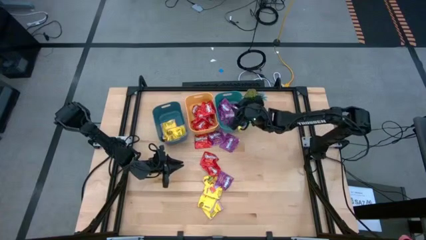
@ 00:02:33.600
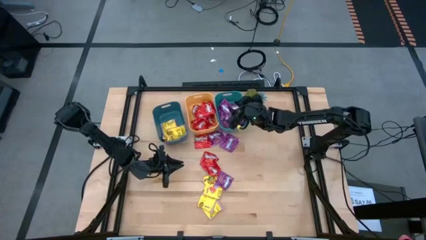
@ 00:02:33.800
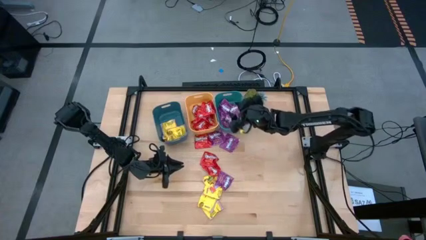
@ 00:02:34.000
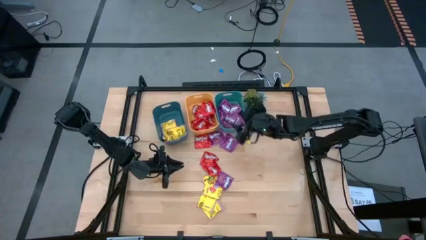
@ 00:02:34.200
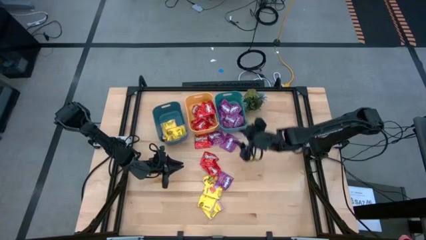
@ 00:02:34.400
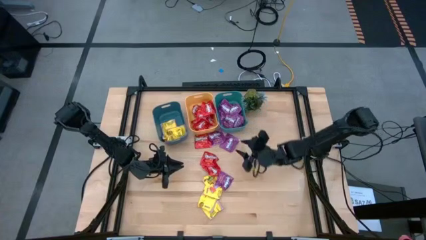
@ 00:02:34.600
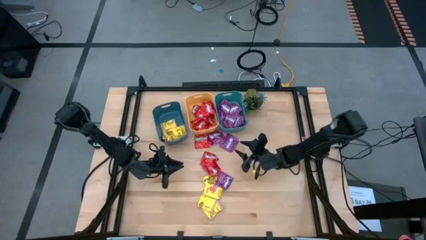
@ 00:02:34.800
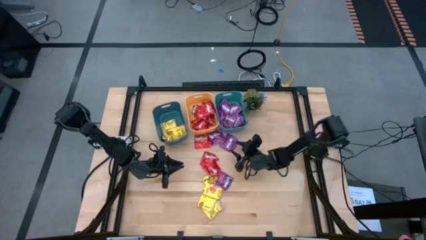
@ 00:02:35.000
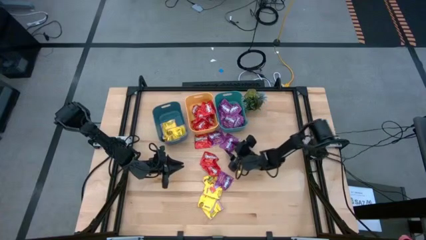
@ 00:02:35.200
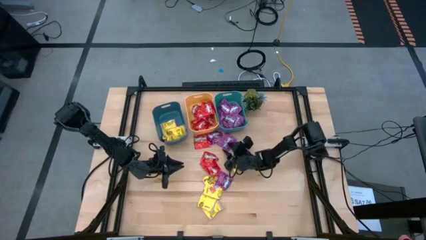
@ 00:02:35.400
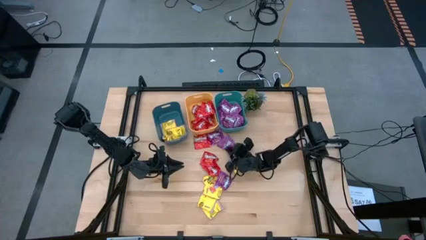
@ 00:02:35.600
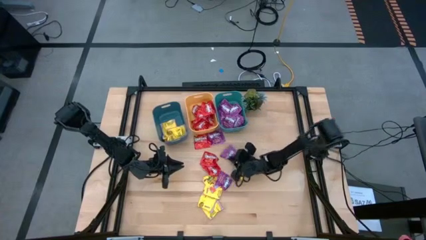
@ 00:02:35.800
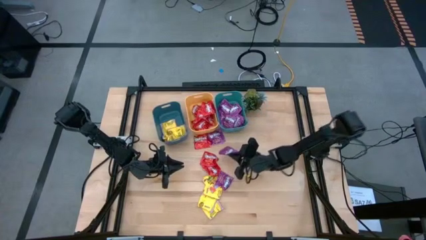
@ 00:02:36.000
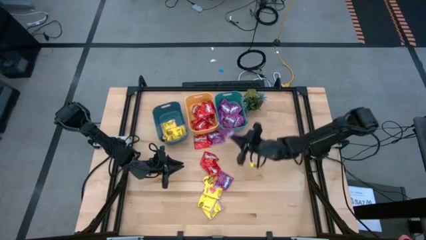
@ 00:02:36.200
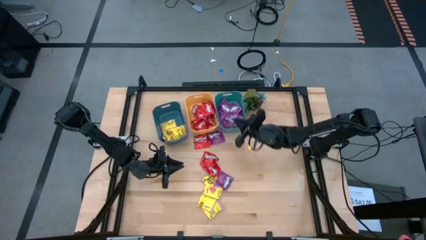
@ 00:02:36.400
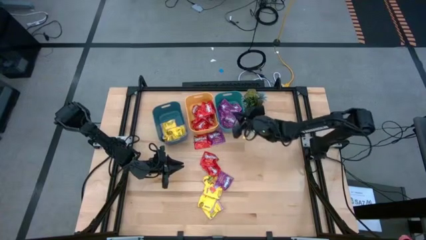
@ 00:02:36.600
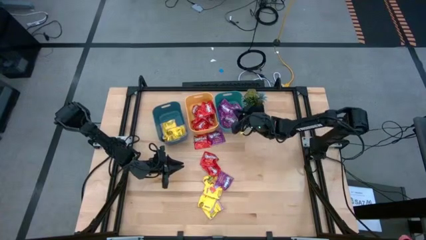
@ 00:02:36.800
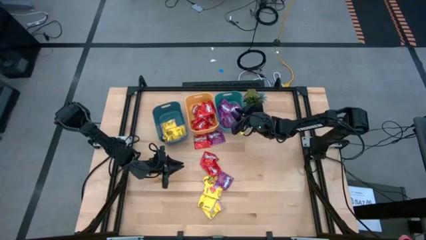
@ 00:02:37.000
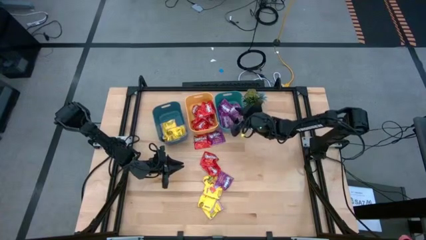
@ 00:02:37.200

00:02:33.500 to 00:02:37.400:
Task: Sort candy
Put the purple candy into the green bin

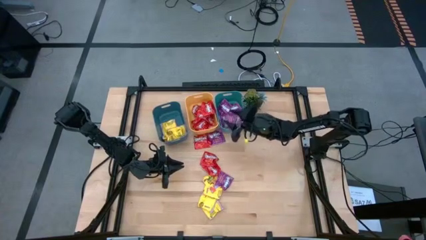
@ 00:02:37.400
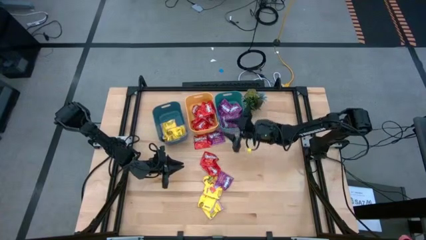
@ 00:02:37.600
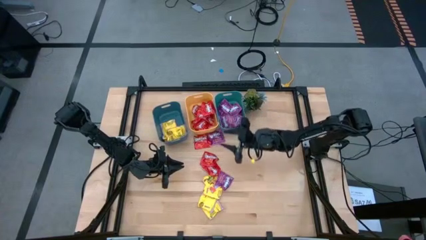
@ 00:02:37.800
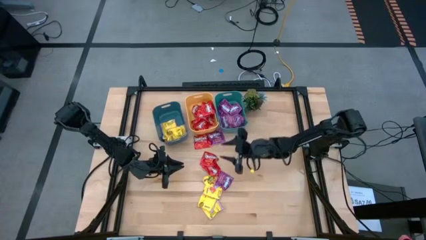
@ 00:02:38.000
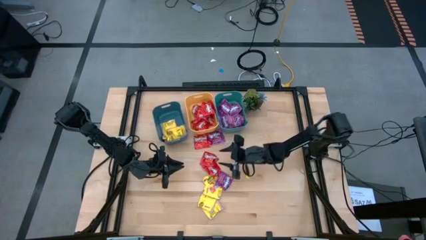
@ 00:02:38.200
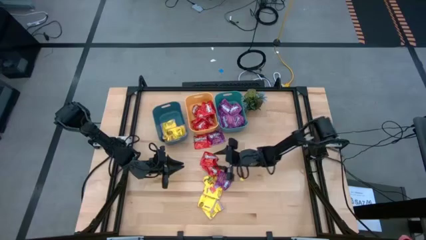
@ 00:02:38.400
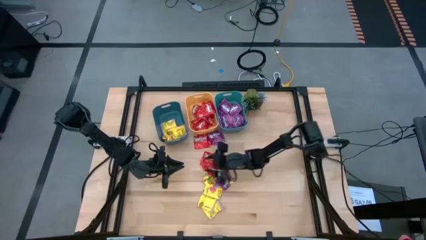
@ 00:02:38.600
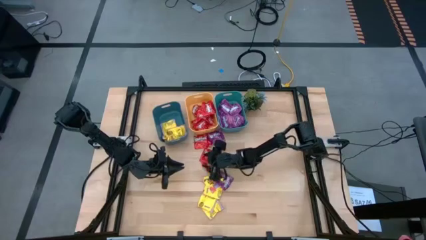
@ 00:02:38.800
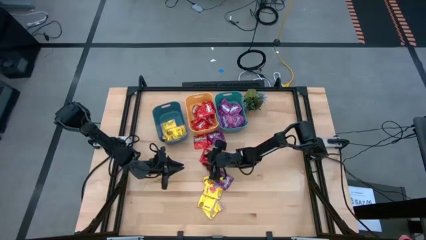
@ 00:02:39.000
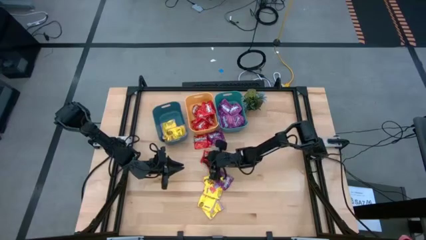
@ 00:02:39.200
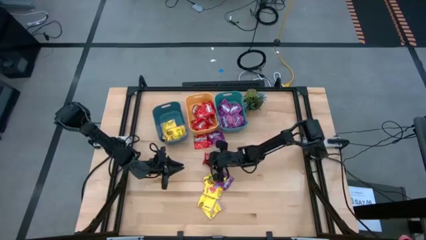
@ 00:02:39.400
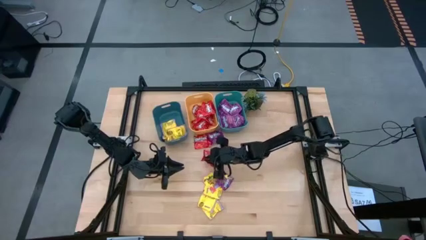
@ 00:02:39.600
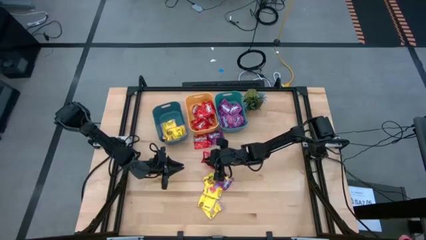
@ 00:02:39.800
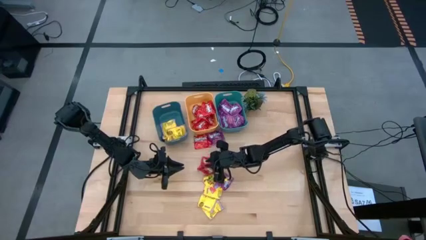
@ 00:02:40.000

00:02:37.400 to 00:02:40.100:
Put the red candy into the yellow bin

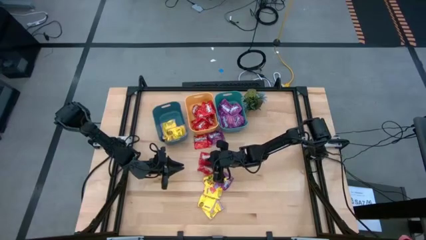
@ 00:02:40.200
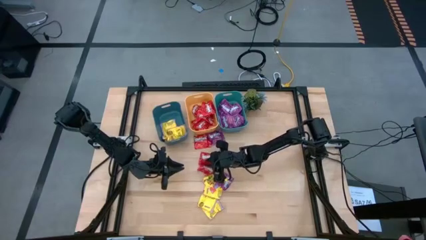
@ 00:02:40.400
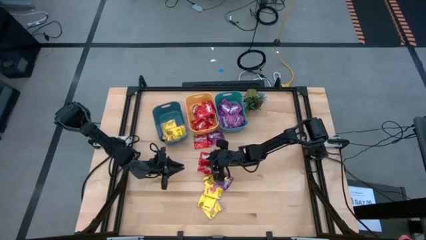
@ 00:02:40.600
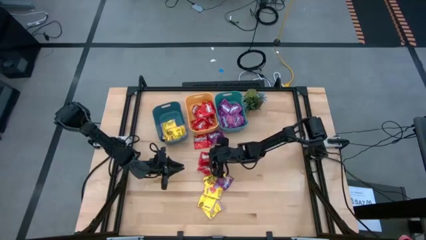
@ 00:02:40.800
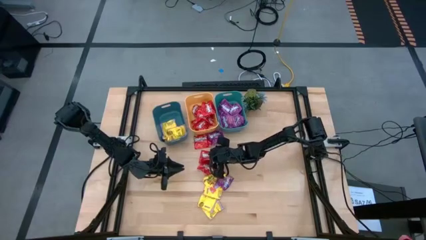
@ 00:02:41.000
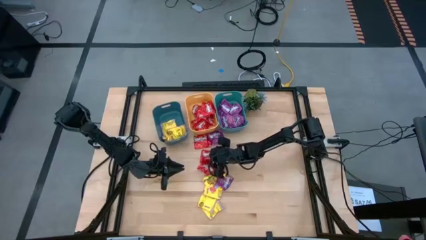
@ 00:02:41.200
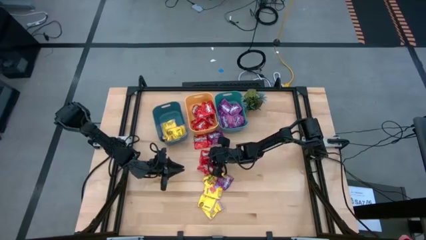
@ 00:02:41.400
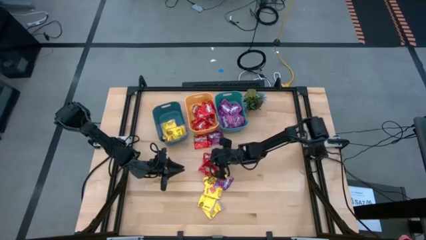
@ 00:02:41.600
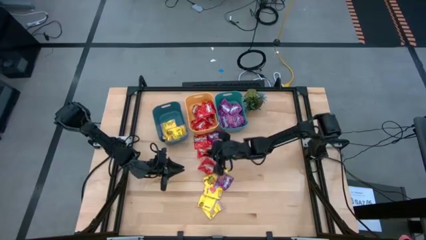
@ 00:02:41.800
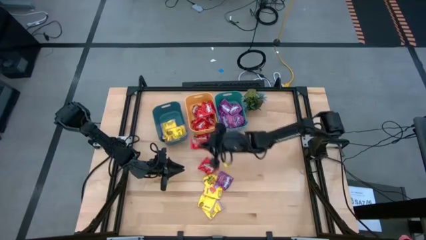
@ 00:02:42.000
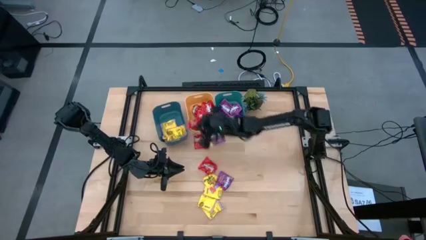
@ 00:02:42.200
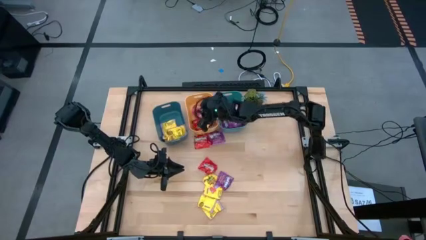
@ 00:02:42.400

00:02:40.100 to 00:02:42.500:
Put the red candy into the yellow bin

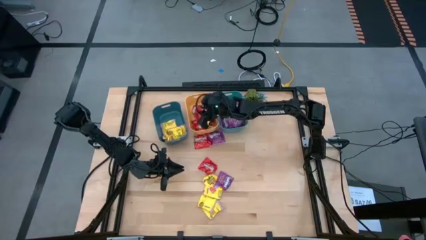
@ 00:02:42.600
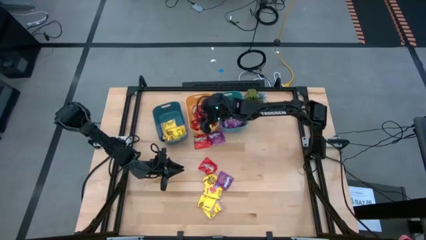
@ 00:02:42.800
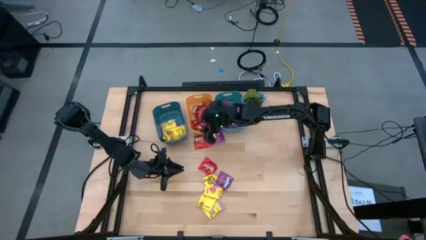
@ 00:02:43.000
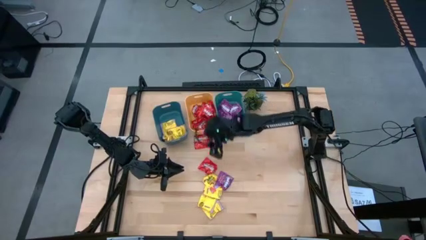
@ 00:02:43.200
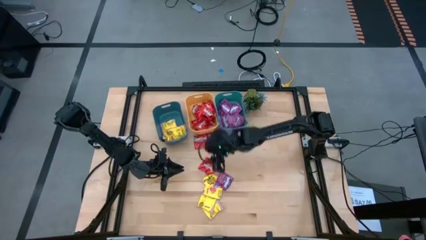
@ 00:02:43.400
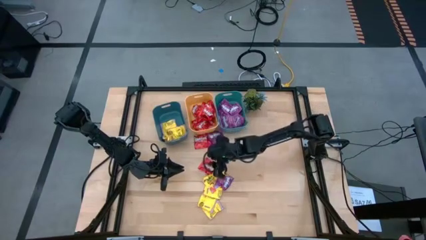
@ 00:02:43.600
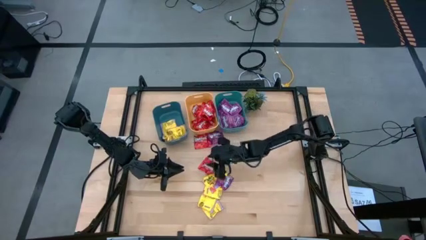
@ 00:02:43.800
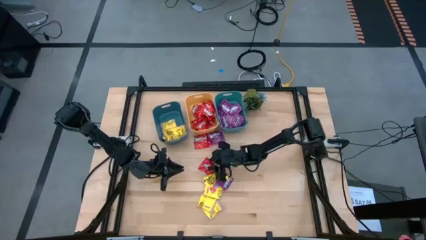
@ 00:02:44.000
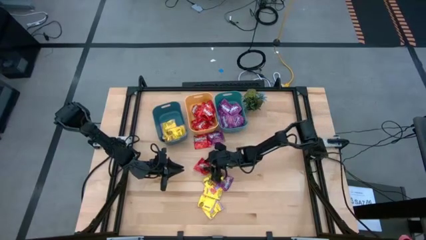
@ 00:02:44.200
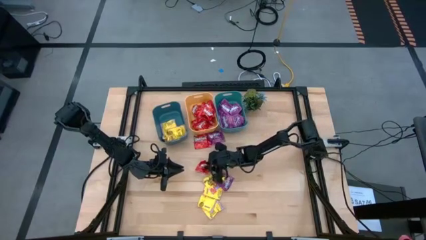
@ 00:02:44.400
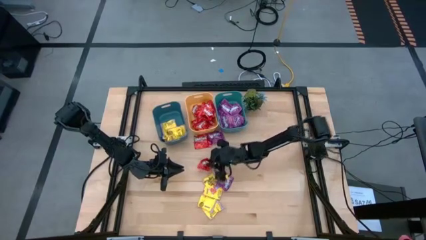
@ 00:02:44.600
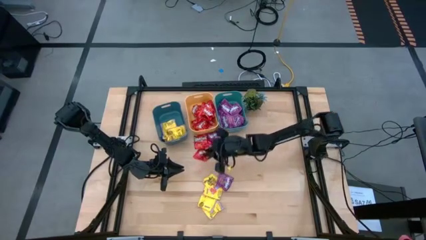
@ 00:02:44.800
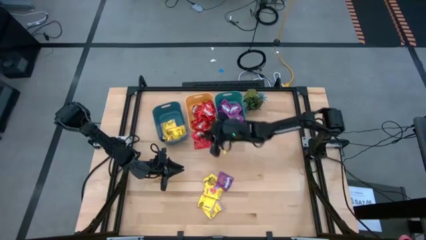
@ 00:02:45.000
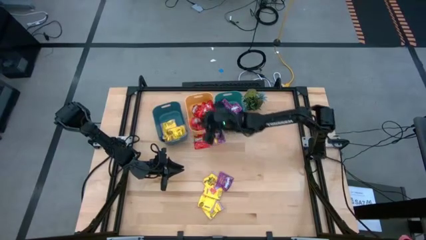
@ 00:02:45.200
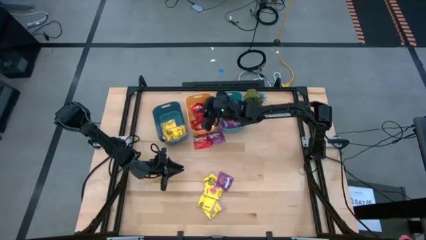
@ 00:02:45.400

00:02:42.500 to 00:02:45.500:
Put the red candy into the yellow bin

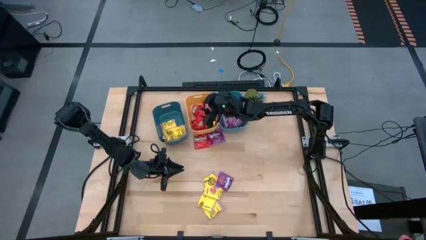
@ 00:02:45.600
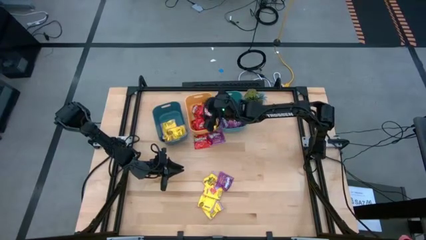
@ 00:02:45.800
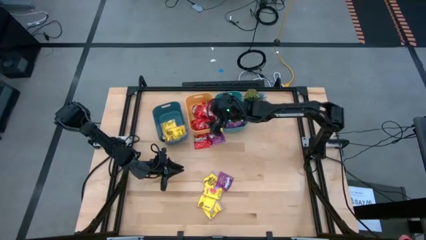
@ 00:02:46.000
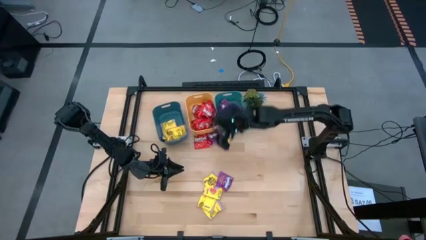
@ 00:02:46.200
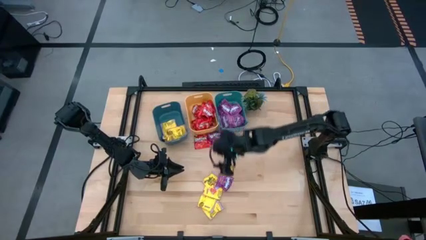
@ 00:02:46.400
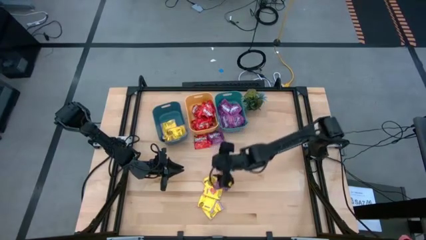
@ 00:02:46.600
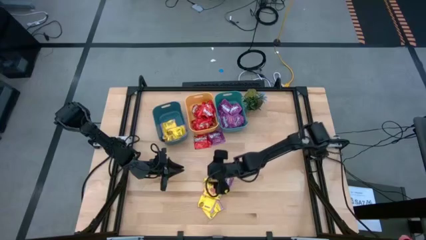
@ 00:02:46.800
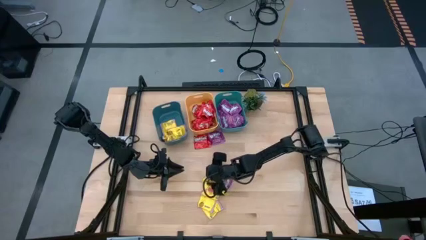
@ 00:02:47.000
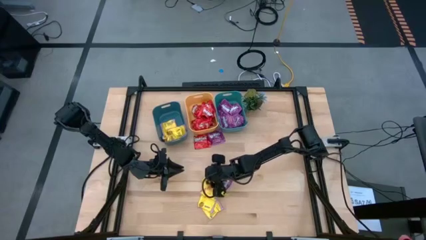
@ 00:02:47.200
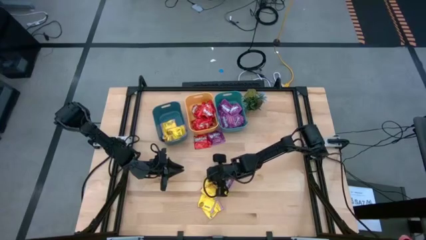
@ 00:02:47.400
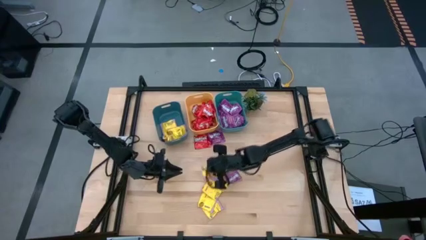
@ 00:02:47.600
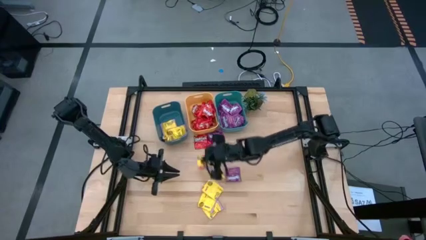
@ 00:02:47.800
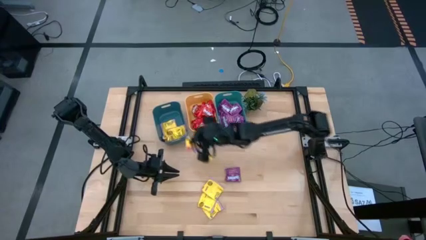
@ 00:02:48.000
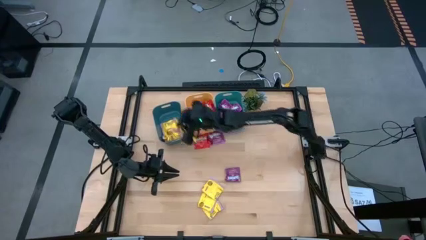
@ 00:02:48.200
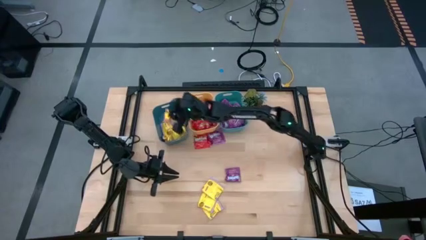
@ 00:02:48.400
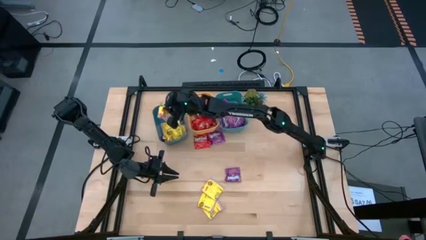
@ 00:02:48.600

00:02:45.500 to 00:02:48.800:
Put the yellow candy into the blue bin
